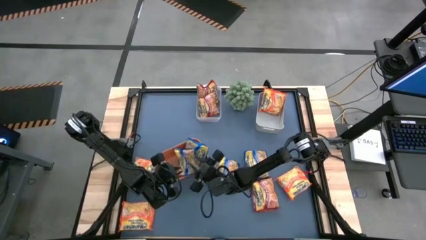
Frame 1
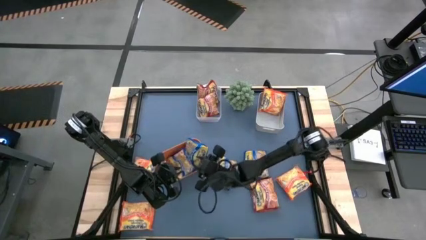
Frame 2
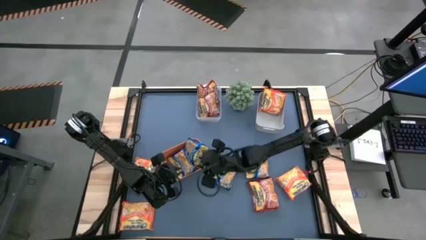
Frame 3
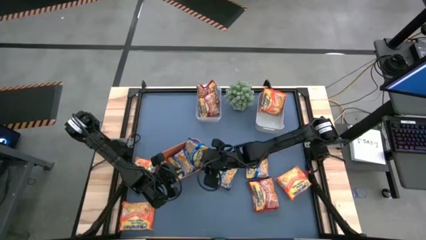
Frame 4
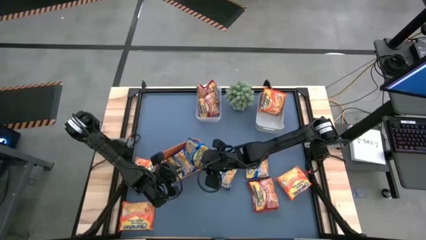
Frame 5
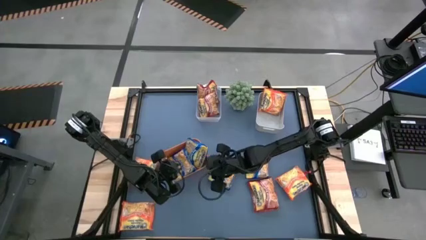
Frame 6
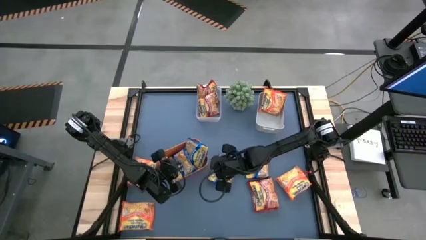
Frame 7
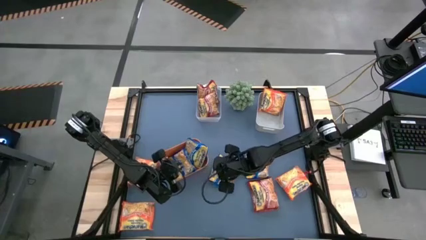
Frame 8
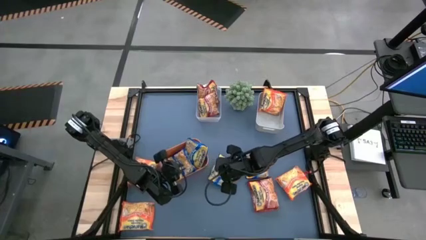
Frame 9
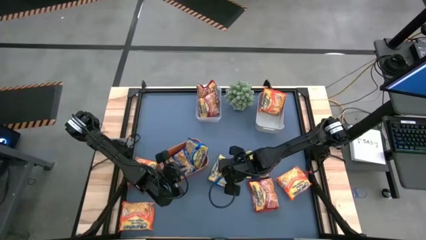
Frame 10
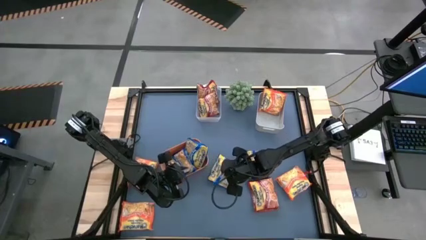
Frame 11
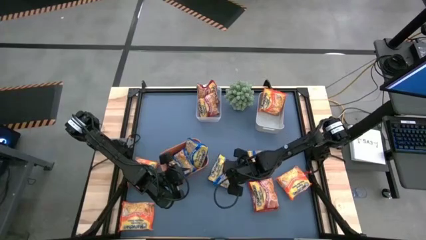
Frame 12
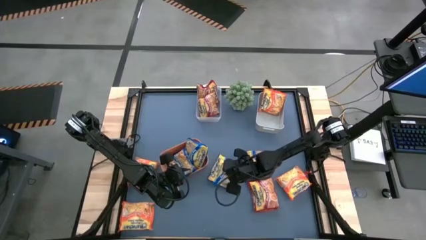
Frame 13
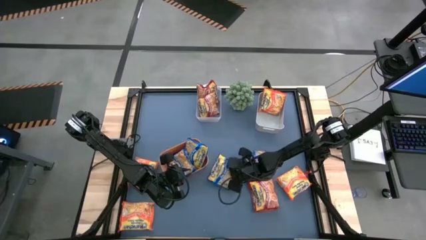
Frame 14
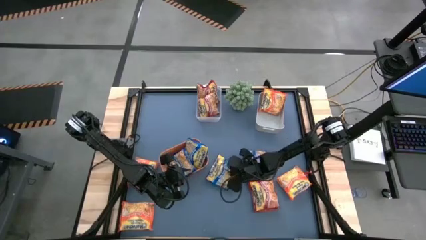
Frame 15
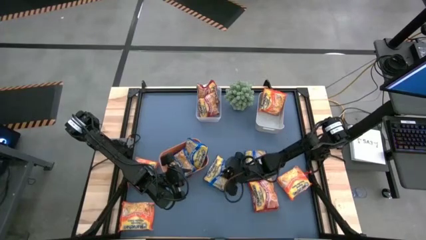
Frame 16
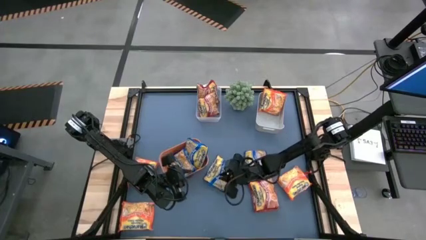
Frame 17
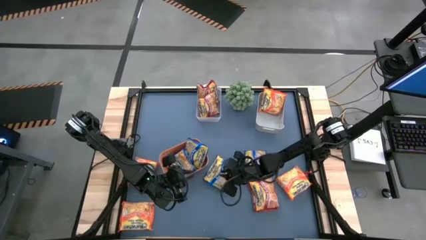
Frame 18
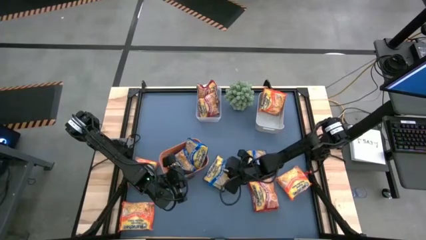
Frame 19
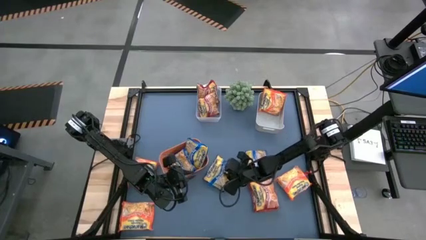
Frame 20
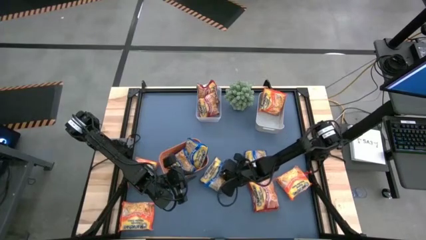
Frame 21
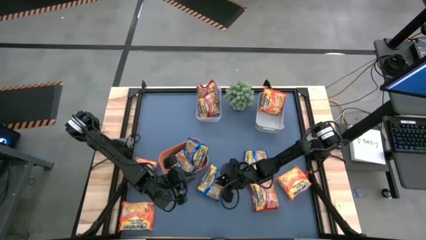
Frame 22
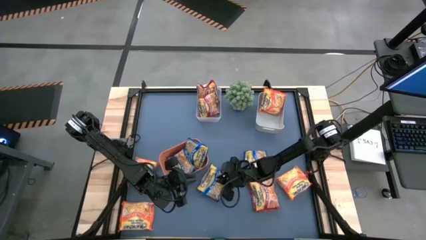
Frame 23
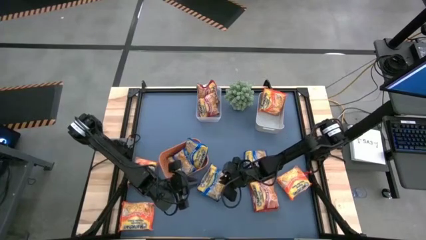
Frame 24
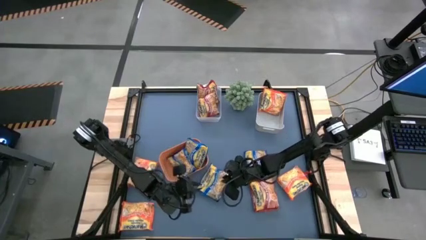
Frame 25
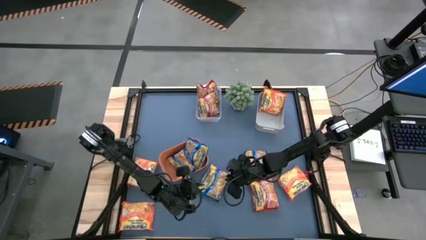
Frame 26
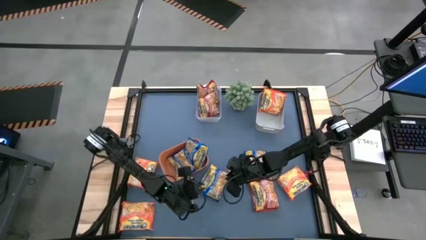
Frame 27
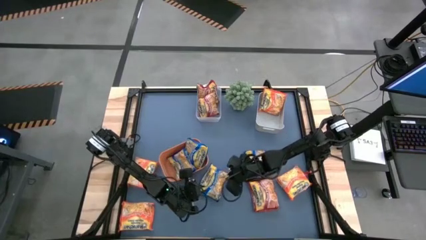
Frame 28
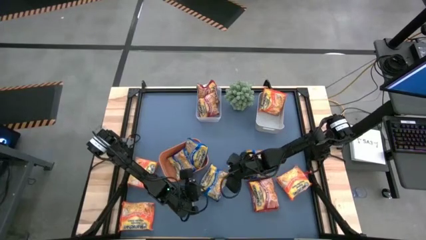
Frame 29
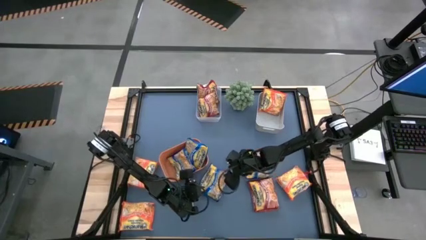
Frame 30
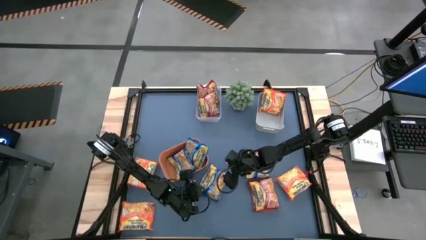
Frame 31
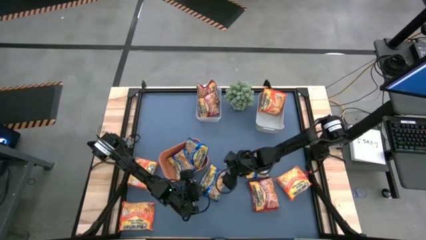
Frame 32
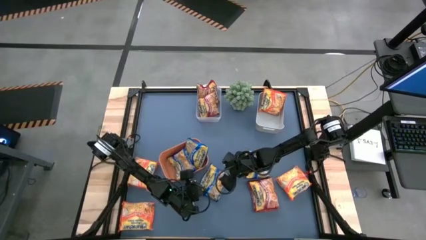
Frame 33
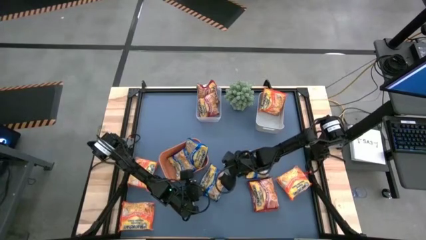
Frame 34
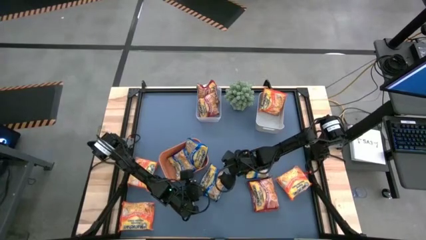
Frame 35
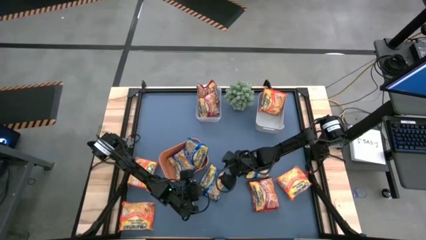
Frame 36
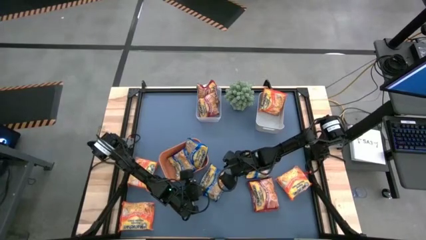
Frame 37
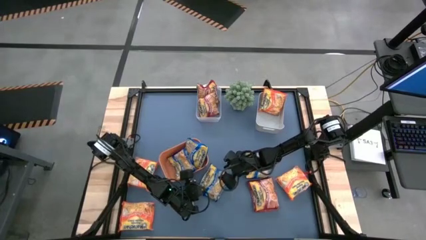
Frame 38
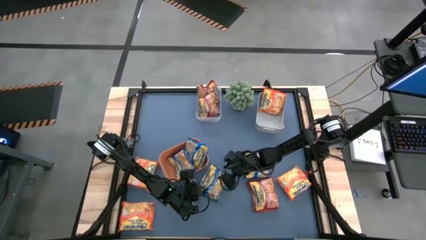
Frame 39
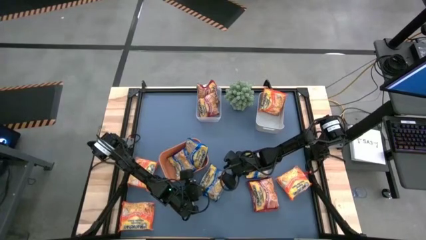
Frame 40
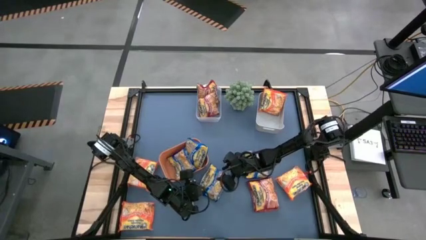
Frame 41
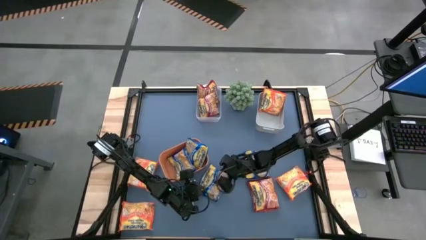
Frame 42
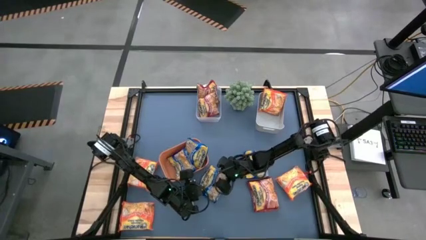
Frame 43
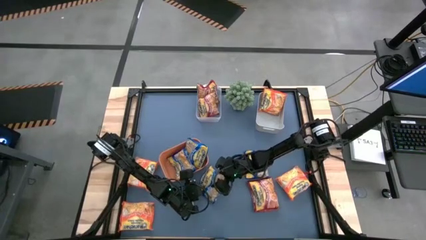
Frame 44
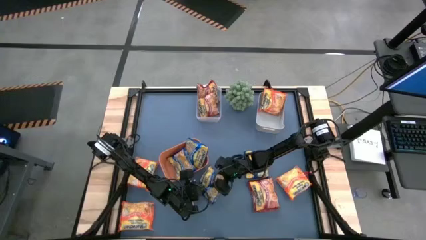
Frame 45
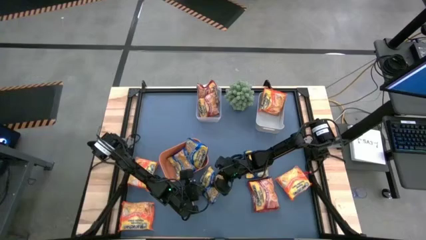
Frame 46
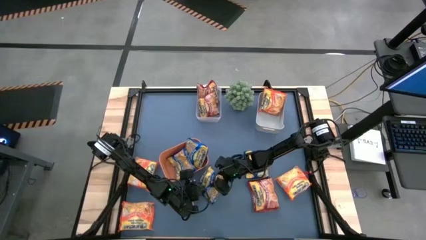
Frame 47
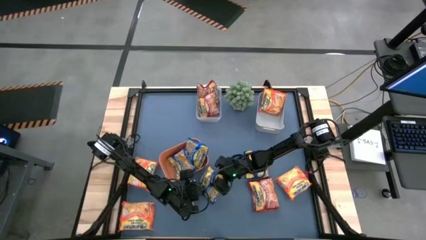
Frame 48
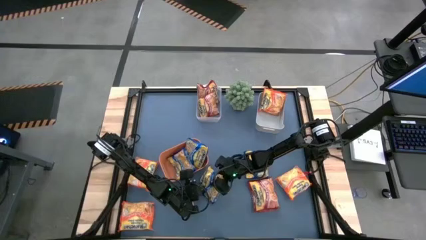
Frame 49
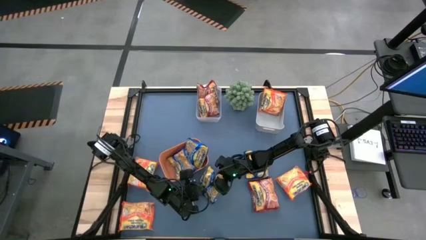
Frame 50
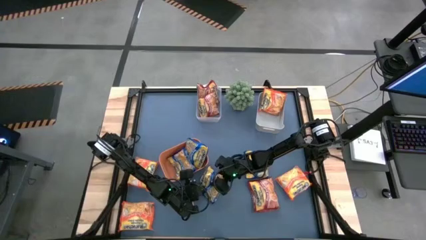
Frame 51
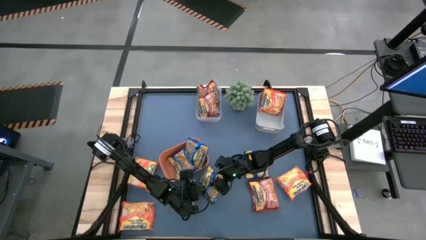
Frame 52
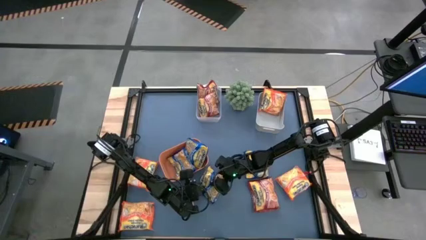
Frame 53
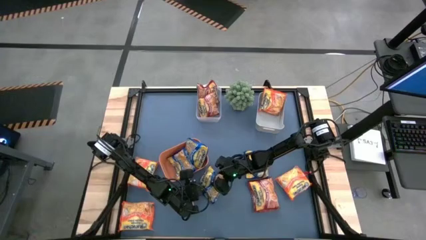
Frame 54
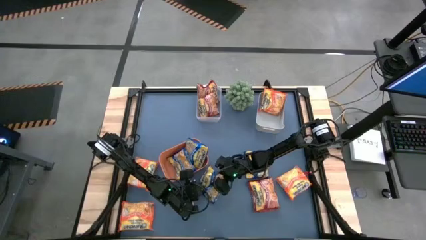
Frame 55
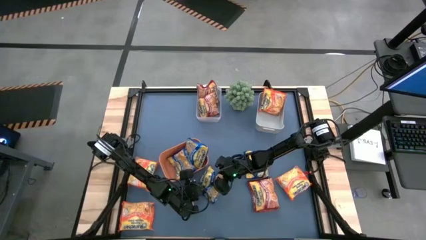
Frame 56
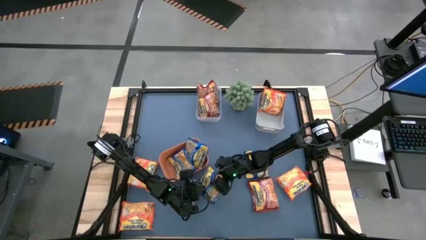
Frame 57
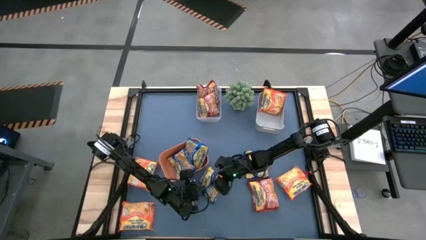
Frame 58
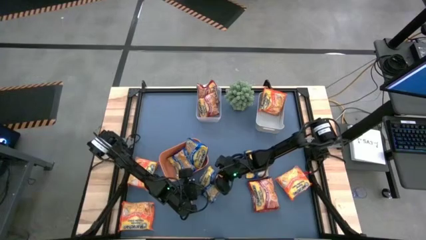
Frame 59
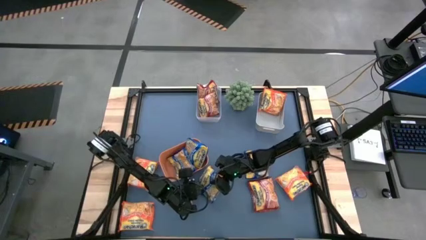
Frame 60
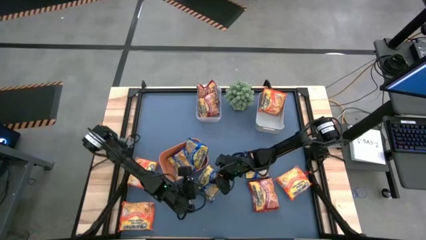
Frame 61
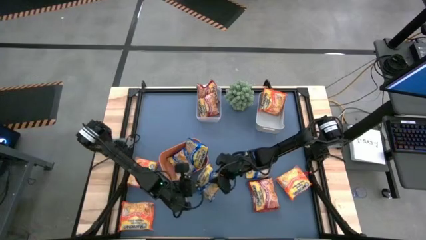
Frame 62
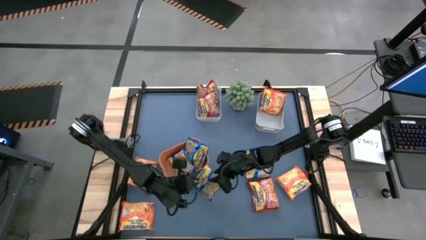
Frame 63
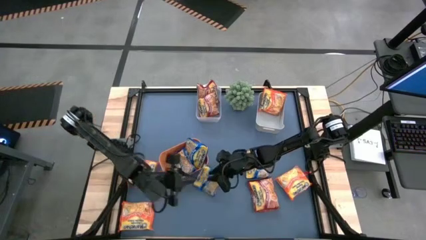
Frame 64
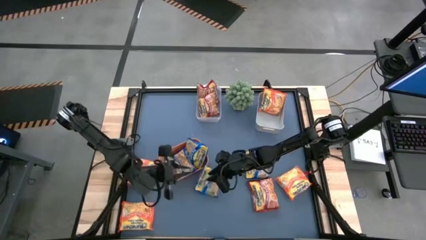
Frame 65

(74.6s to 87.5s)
Task: Sort Maruchan noodles
Put the blue noodle pack into the orange bin

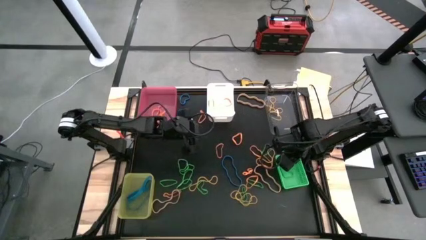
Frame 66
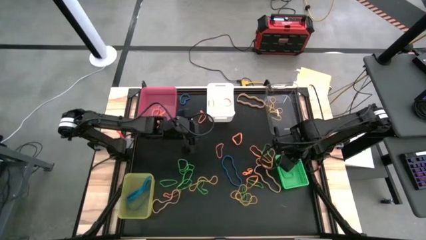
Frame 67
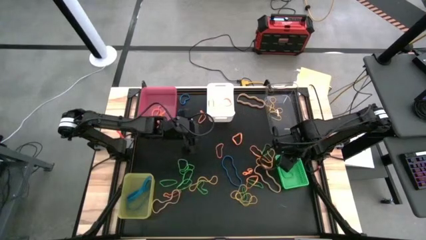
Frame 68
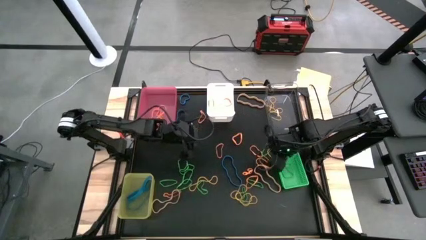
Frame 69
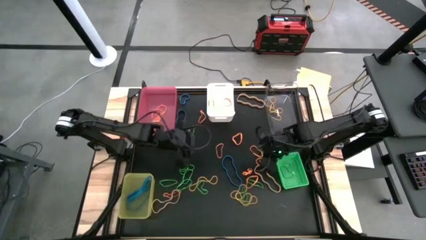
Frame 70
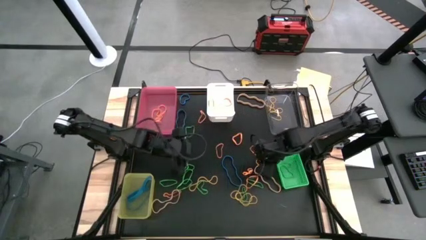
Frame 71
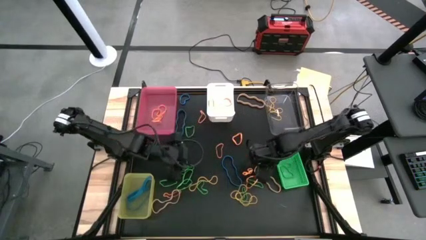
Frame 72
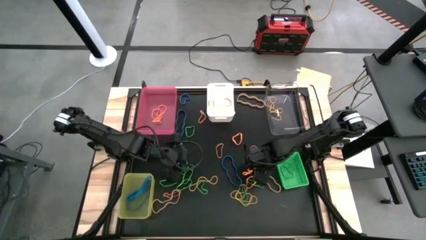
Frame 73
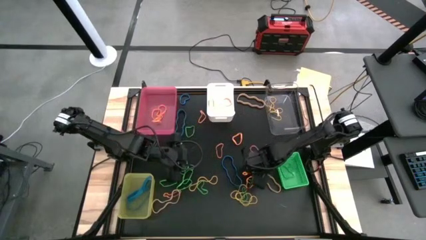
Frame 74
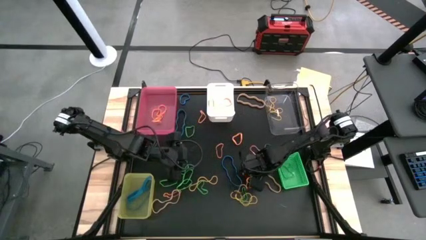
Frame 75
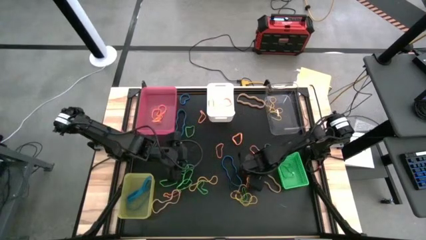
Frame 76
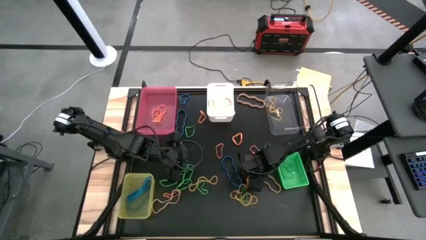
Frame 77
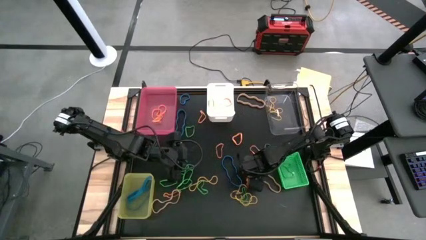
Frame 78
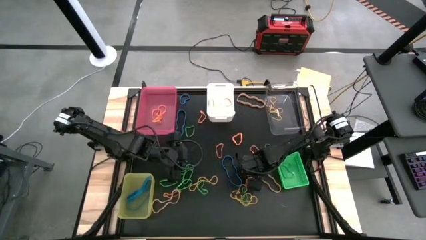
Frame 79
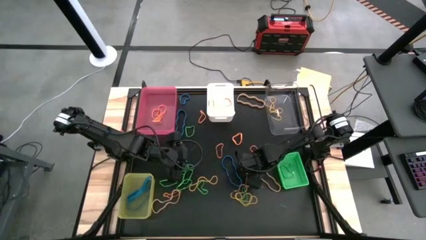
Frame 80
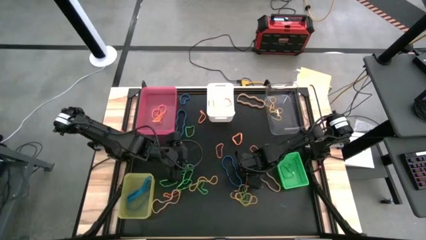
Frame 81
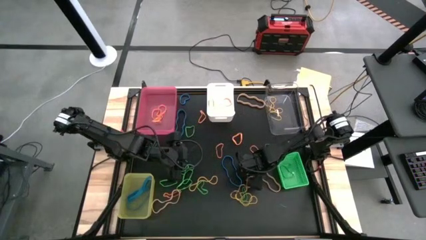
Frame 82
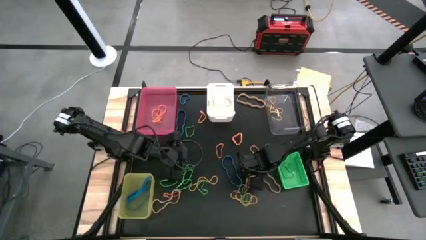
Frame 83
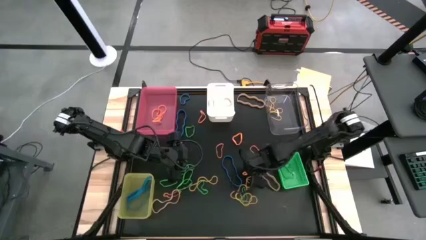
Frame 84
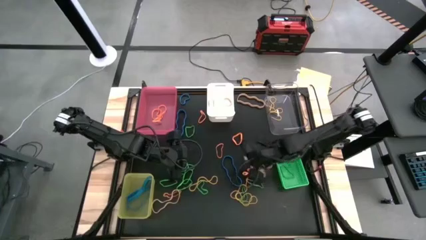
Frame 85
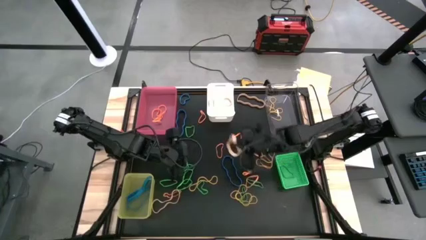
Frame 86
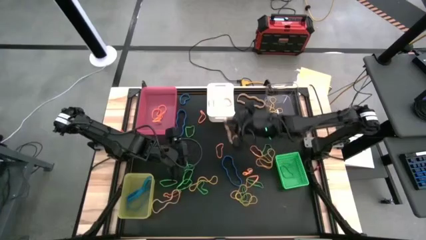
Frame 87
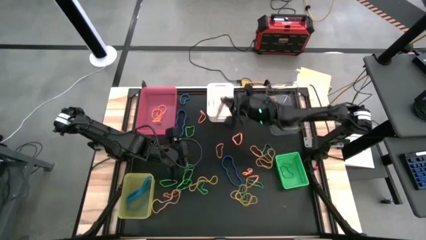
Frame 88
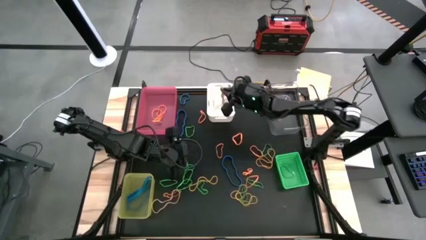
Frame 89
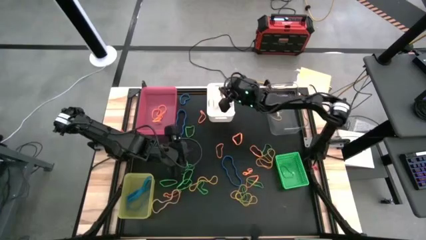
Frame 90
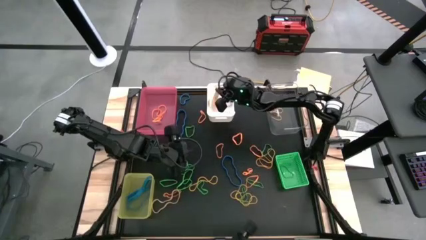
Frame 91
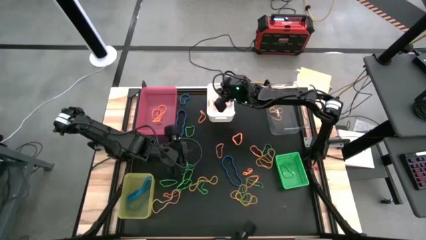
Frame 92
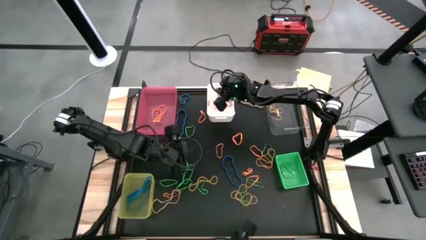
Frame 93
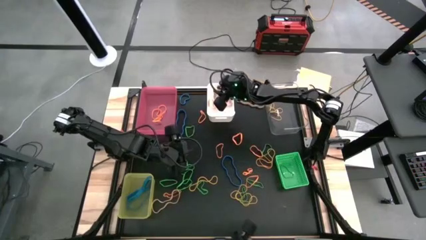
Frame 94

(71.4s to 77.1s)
Task: Sort rubber bands into baskets
Put the light orange rubber band into the white bin
